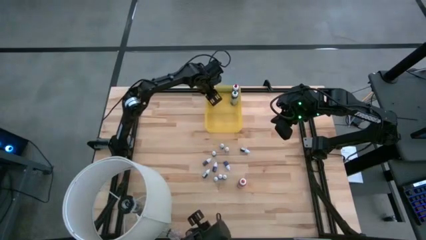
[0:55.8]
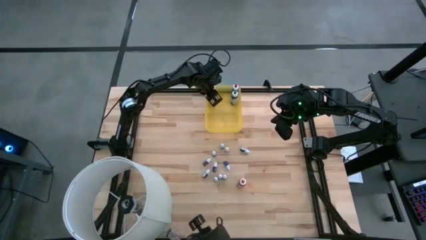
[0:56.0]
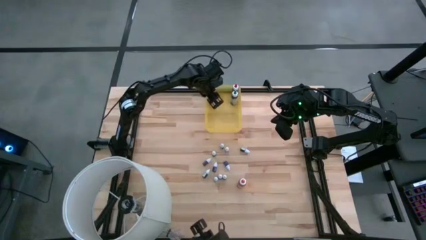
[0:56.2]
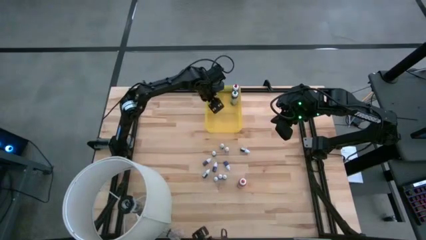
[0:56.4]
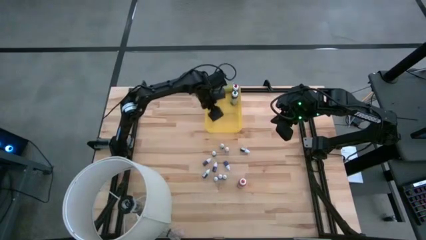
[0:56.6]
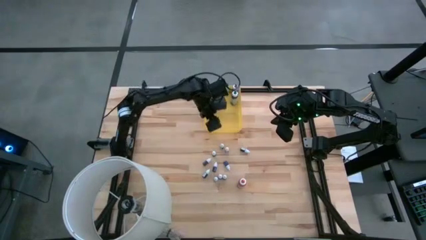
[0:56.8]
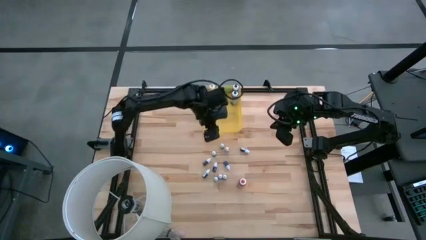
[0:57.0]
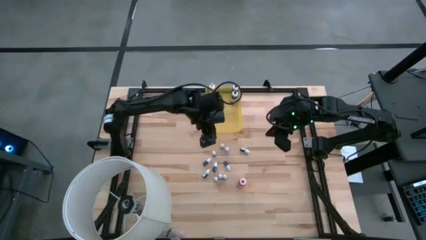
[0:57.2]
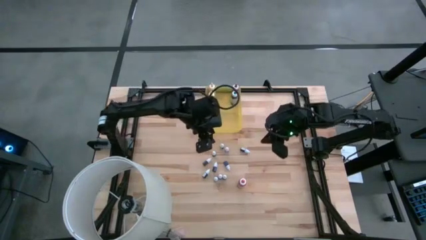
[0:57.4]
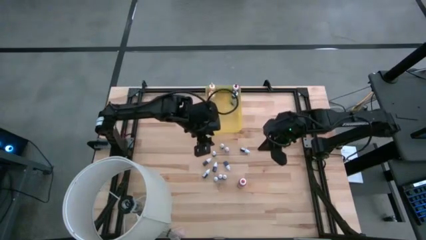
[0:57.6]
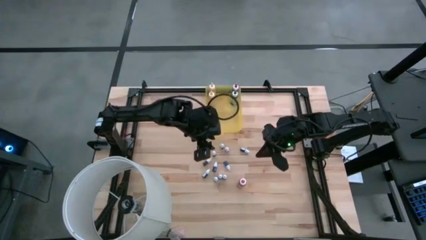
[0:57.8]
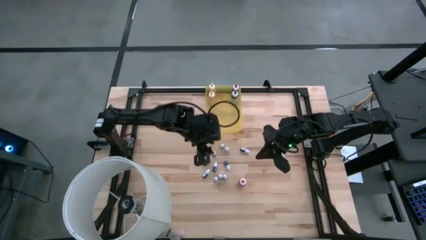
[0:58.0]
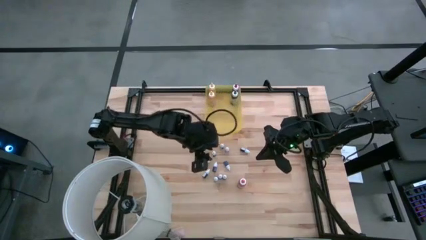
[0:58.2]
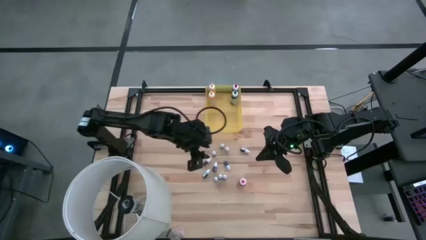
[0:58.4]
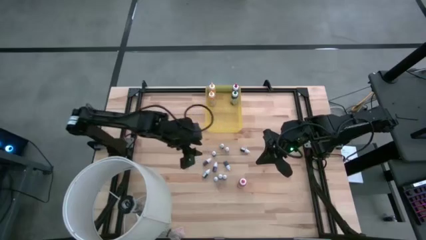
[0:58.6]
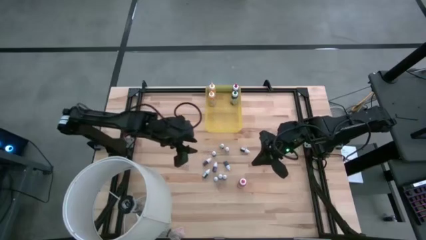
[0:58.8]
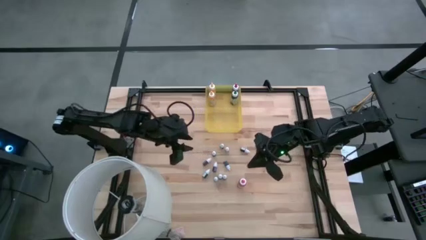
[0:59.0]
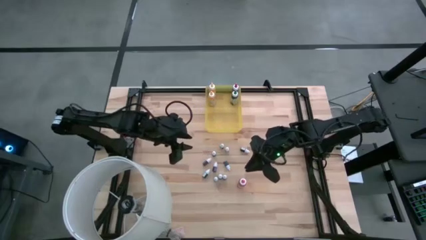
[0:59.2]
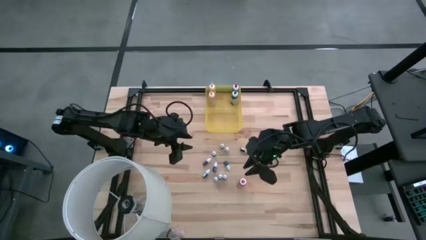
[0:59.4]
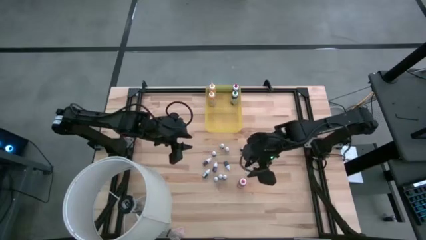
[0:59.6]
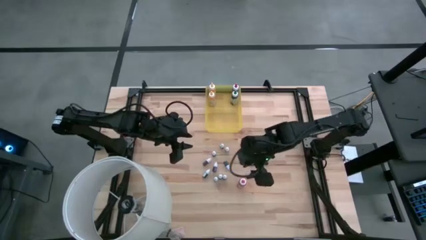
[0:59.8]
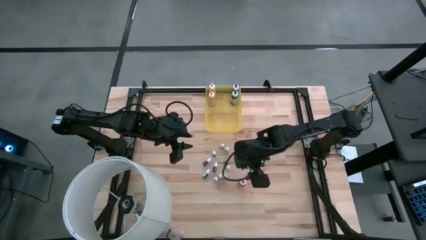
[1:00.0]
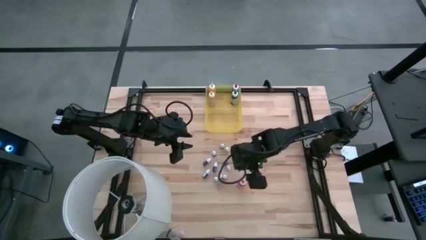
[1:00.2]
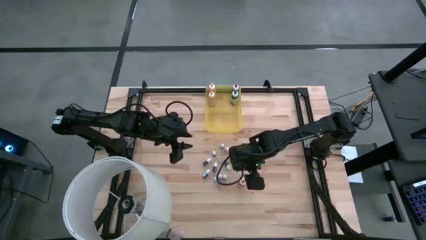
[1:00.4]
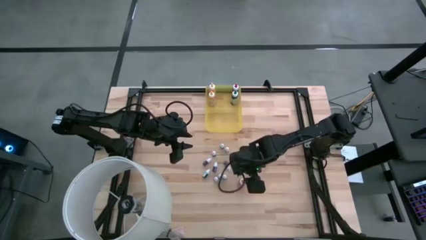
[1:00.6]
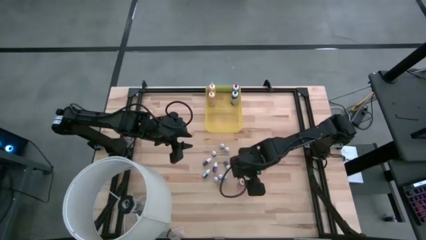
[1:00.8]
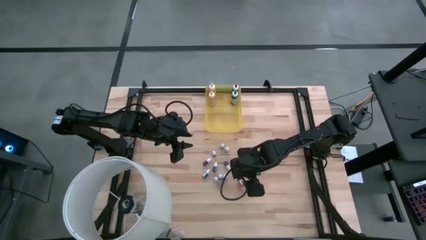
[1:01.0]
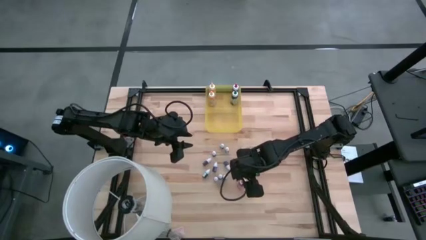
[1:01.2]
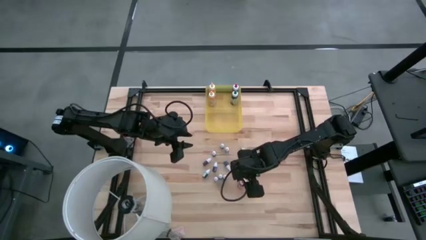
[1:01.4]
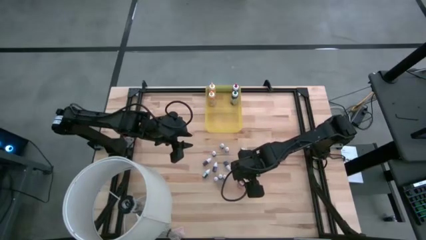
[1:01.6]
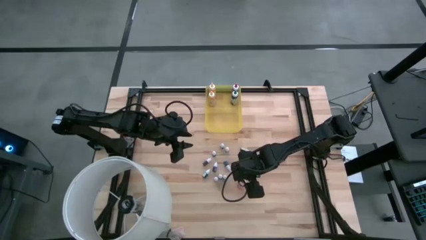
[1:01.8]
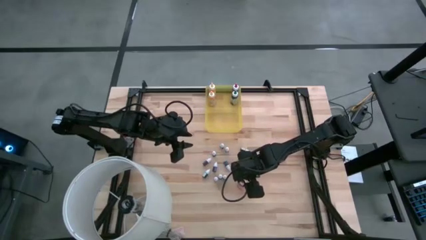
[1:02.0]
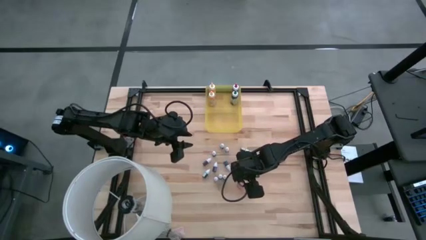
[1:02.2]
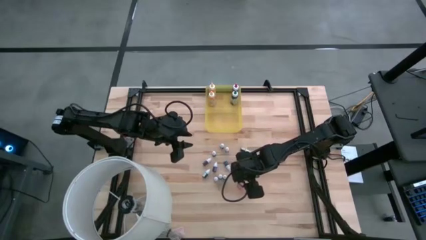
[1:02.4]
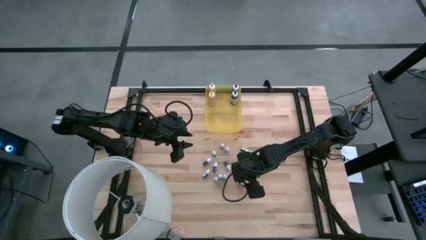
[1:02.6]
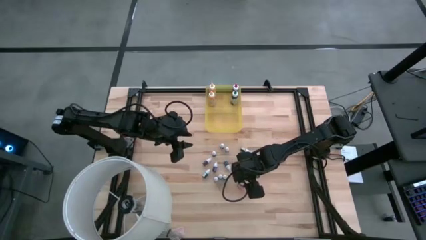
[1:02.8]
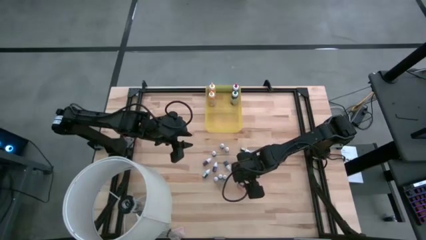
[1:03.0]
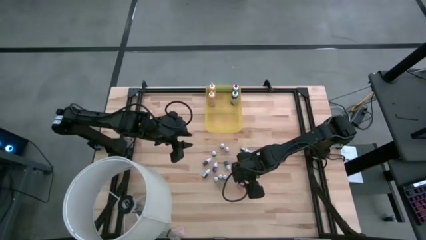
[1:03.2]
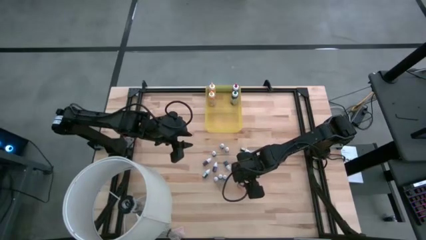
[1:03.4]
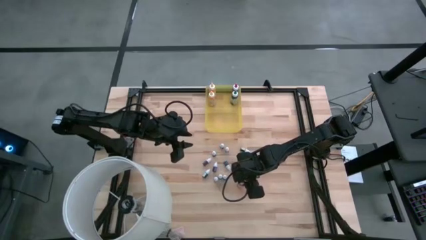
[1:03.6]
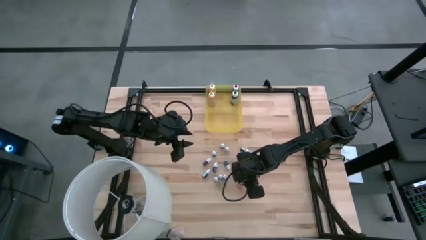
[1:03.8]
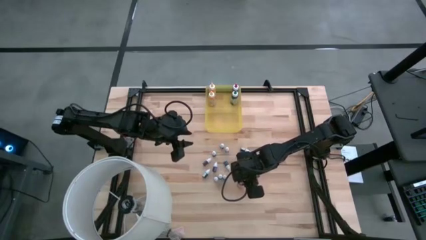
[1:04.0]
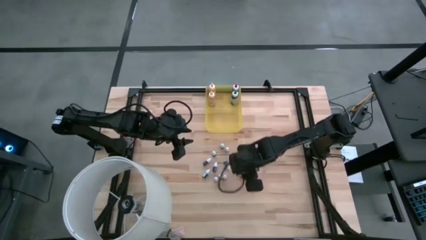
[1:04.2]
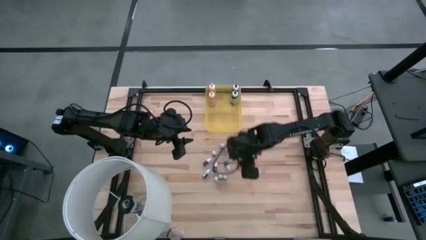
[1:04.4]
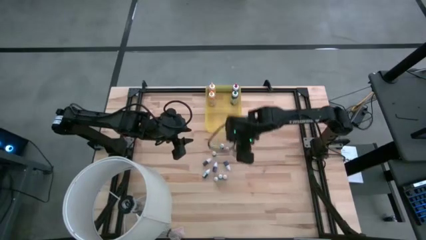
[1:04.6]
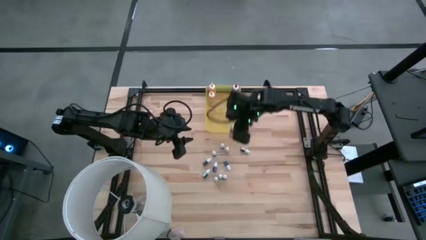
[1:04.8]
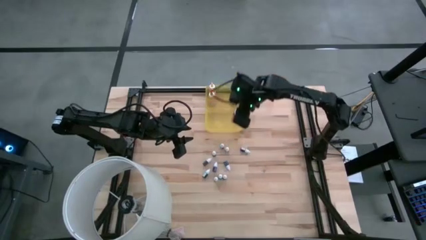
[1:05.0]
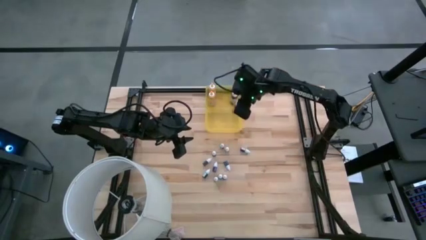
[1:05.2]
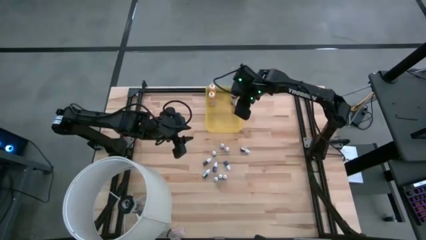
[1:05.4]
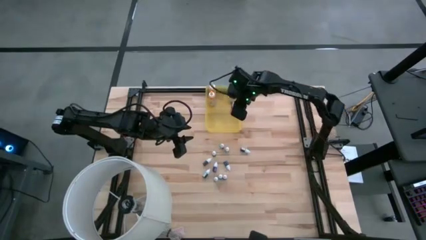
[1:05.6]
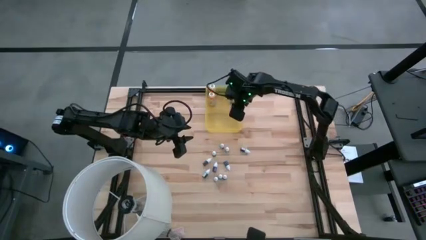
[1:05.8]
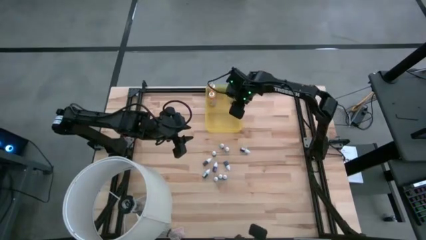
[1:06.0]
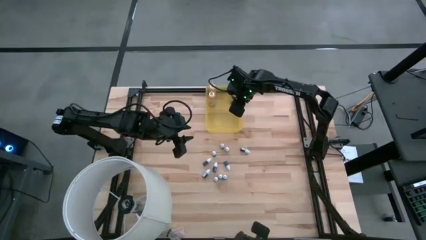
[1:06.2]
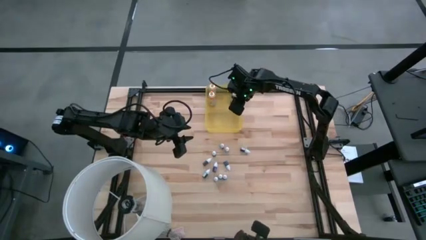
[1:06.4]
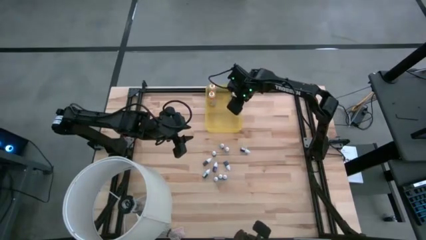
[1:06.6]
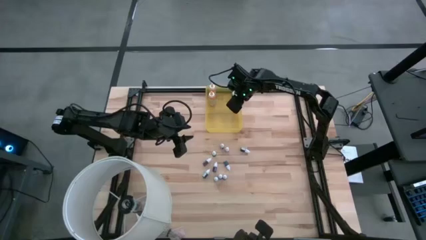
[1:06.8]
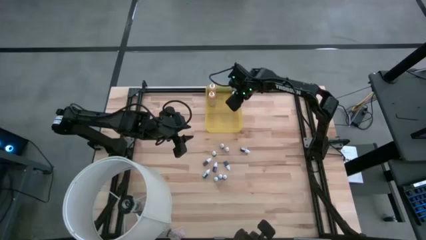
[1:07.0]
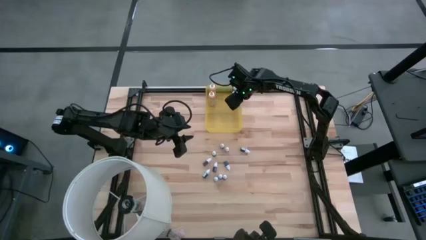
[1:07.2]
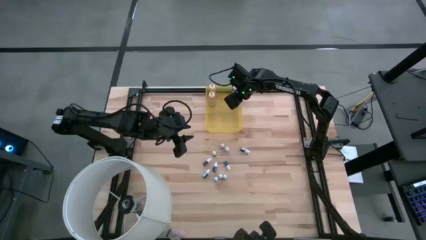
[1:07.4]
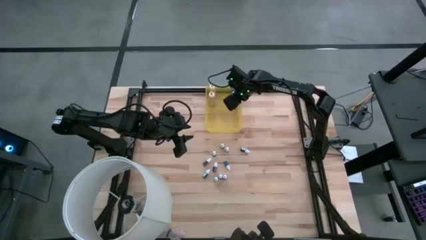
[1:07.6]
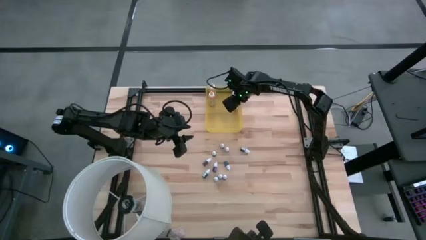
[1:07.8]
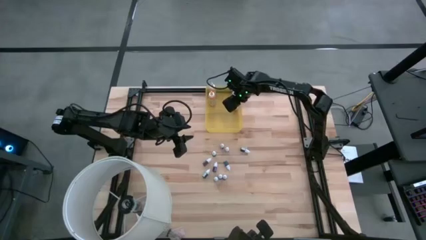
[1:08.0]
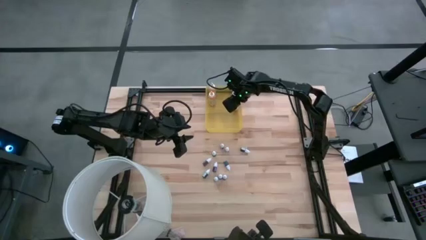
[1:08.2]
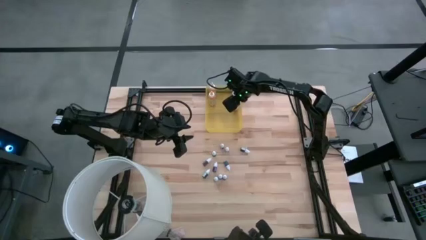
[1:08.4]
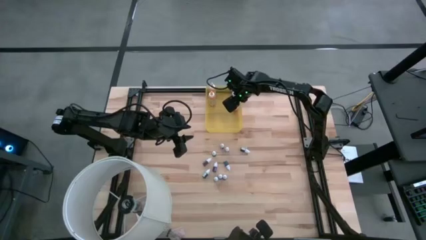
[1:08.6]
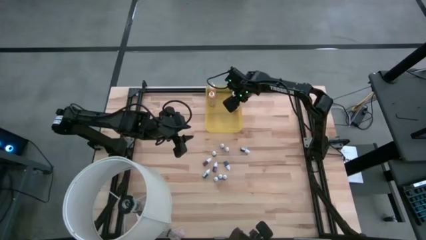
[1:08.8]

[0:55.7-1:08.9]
Task: Pick & Place food coloring
Put the large orange food coloring bottle into the yellow container
